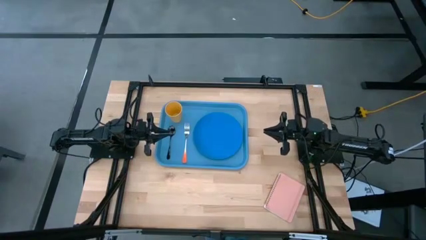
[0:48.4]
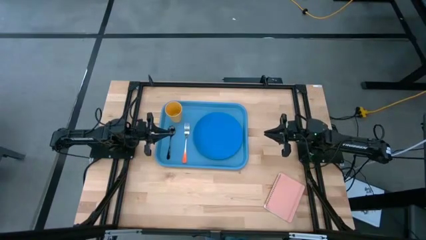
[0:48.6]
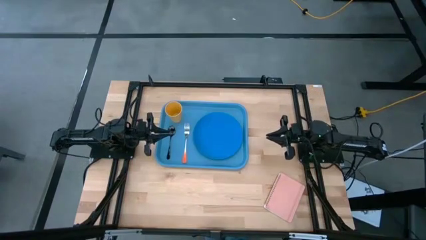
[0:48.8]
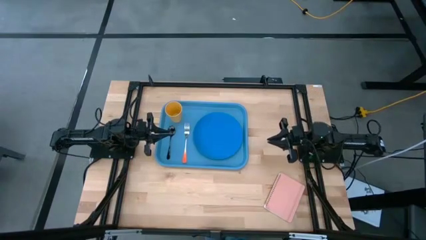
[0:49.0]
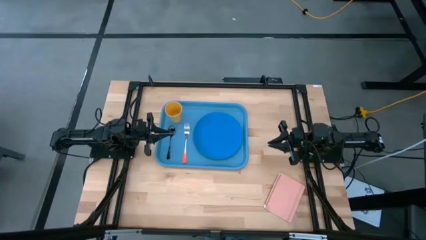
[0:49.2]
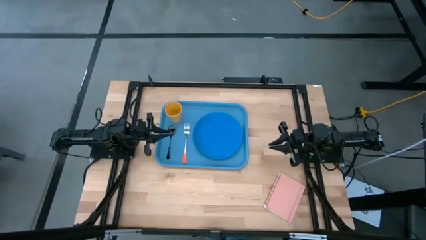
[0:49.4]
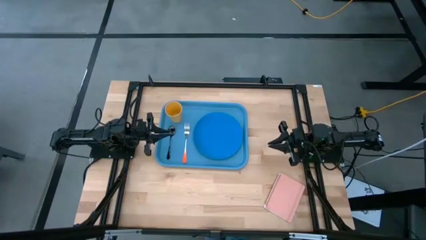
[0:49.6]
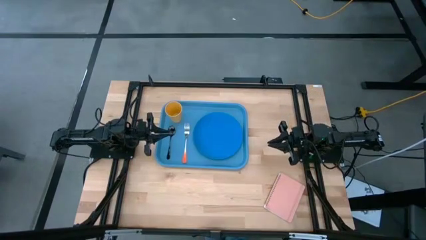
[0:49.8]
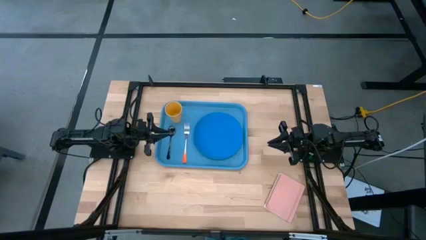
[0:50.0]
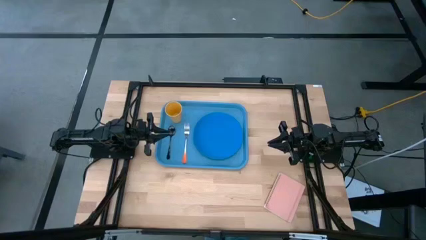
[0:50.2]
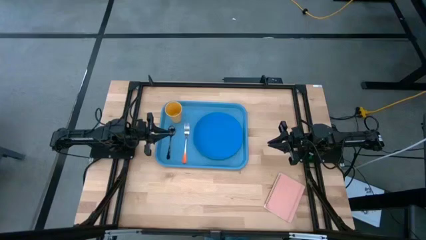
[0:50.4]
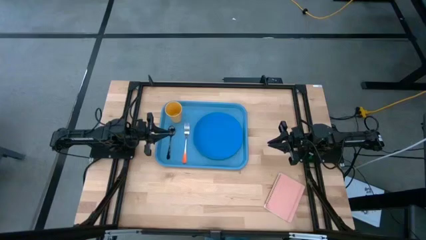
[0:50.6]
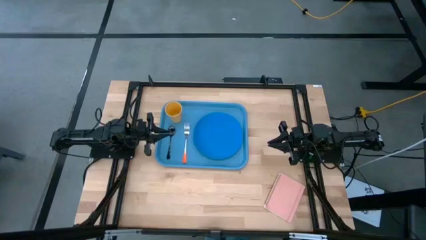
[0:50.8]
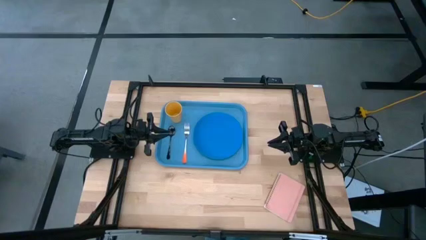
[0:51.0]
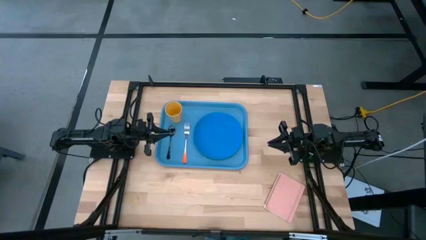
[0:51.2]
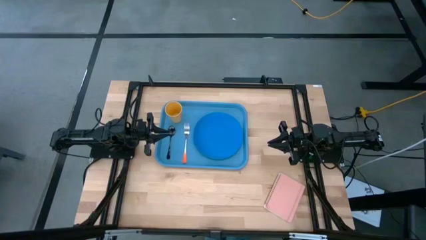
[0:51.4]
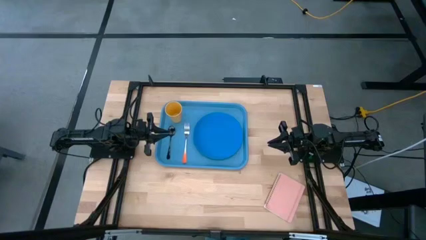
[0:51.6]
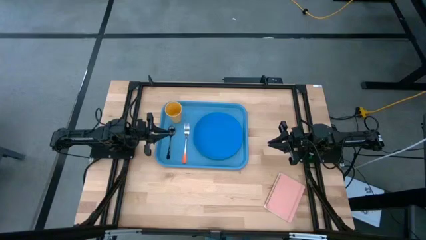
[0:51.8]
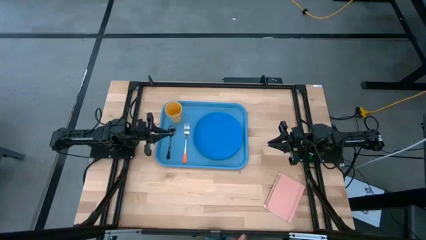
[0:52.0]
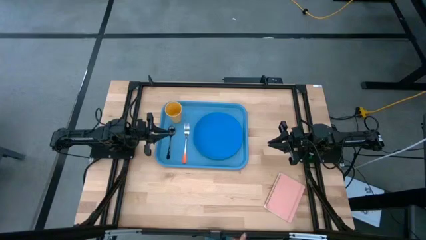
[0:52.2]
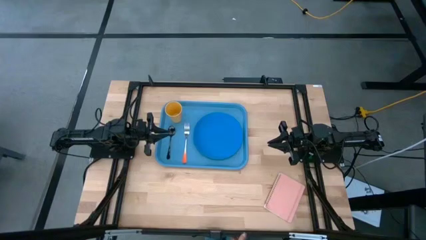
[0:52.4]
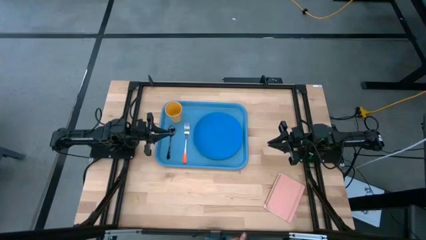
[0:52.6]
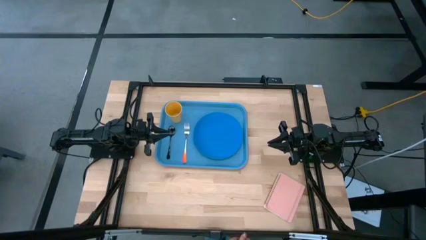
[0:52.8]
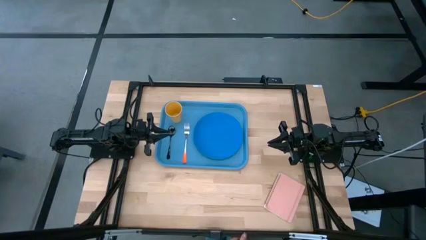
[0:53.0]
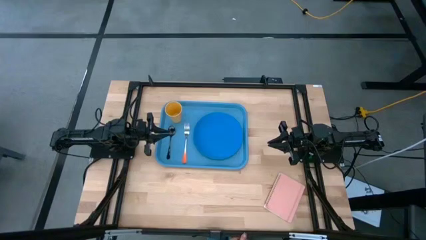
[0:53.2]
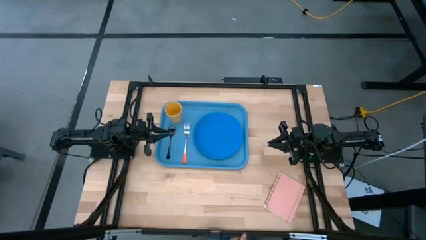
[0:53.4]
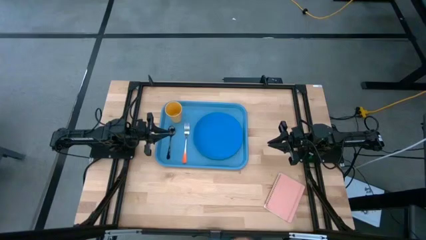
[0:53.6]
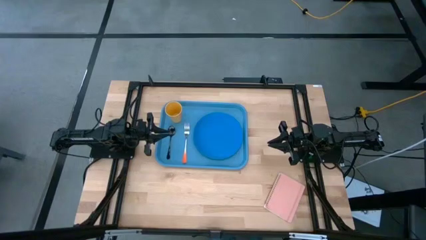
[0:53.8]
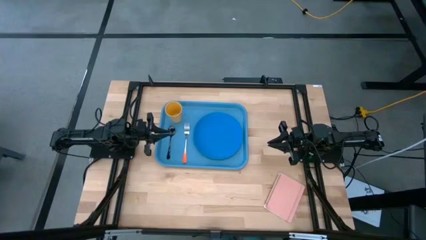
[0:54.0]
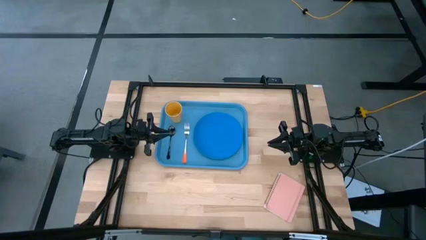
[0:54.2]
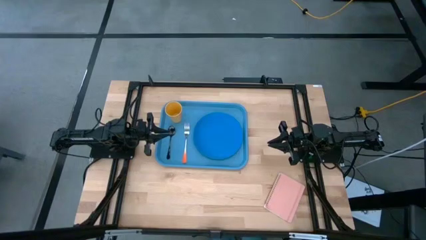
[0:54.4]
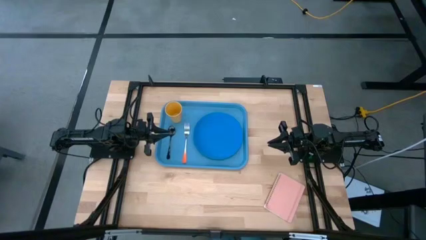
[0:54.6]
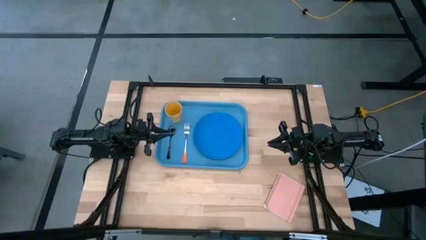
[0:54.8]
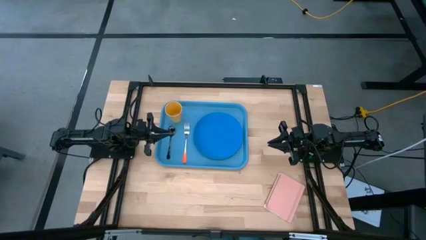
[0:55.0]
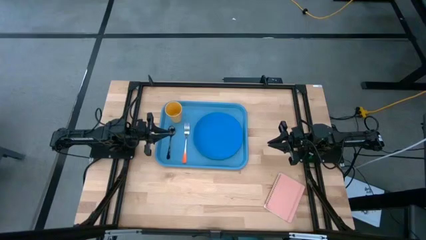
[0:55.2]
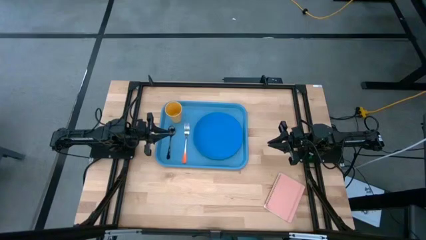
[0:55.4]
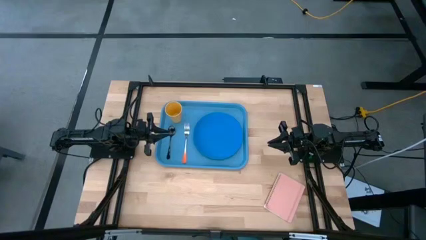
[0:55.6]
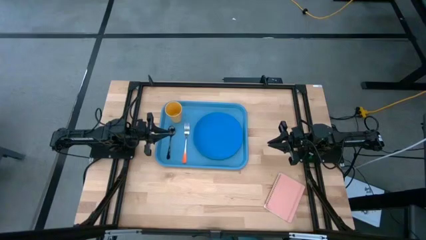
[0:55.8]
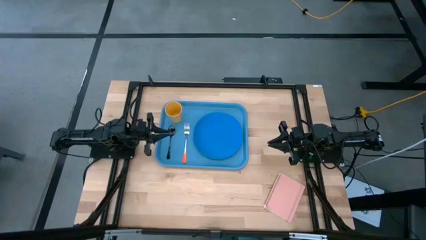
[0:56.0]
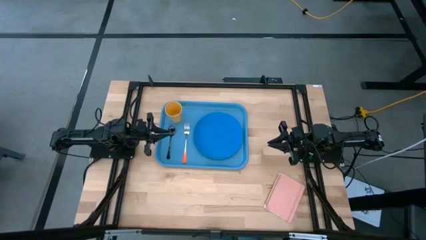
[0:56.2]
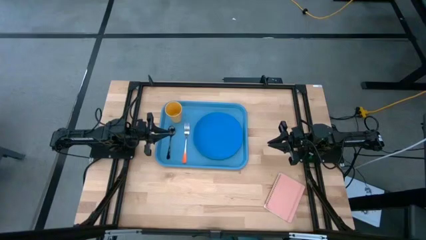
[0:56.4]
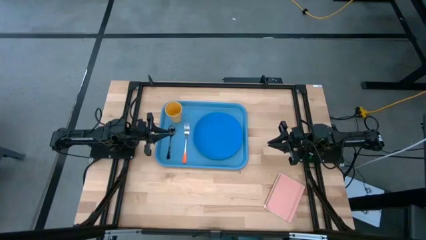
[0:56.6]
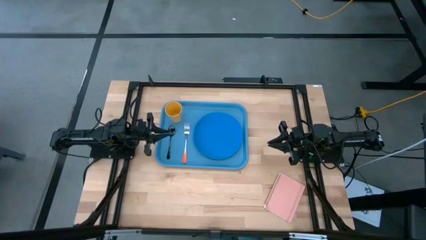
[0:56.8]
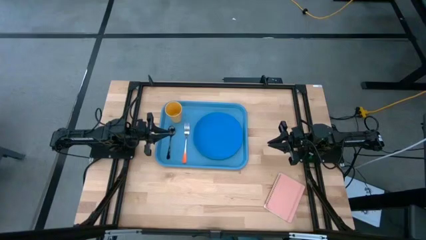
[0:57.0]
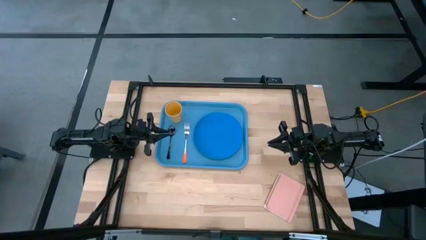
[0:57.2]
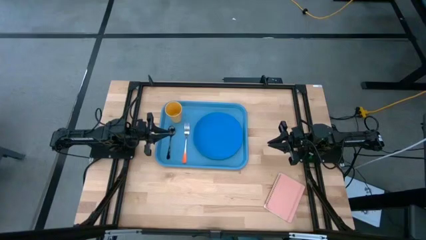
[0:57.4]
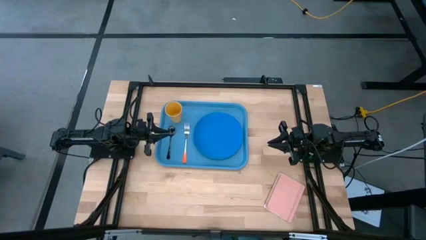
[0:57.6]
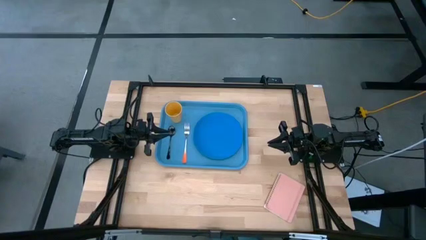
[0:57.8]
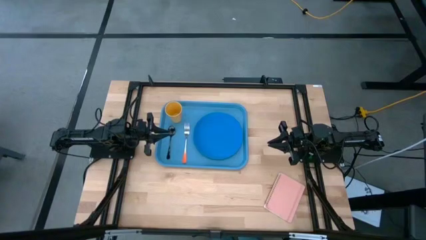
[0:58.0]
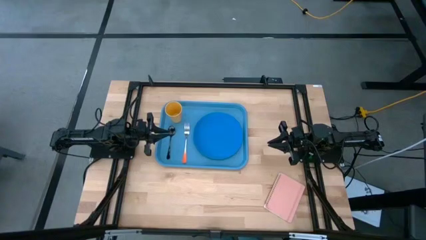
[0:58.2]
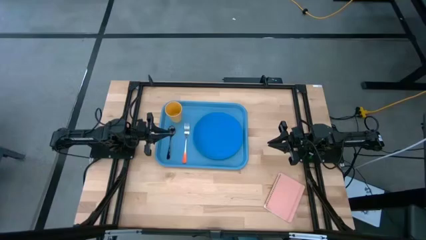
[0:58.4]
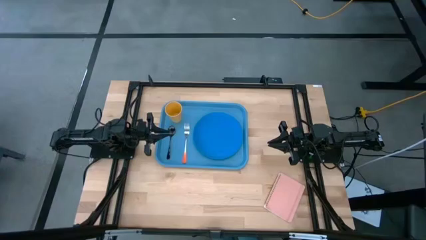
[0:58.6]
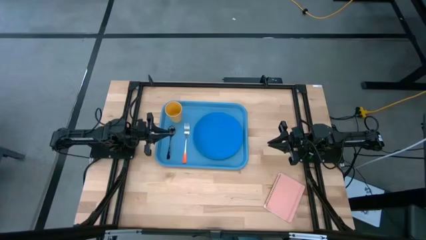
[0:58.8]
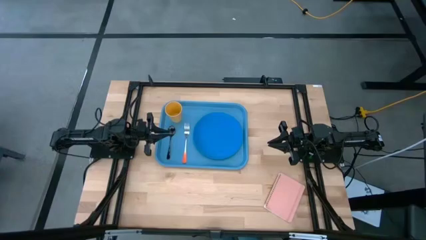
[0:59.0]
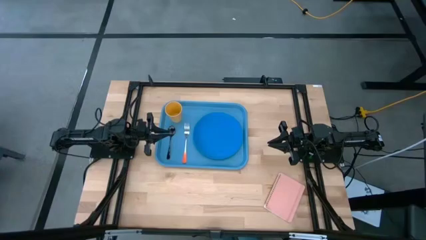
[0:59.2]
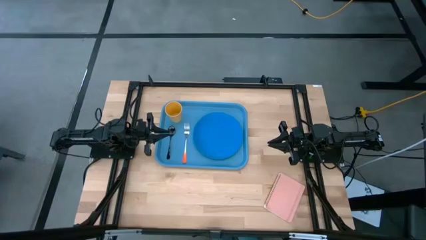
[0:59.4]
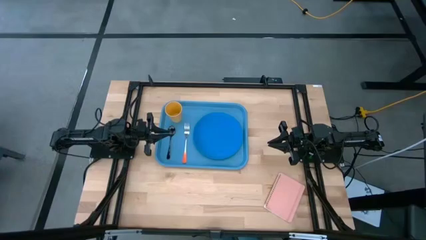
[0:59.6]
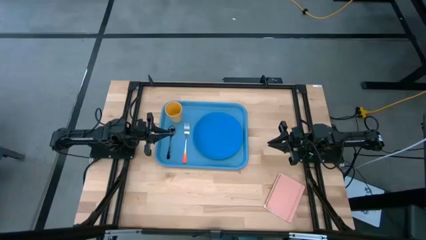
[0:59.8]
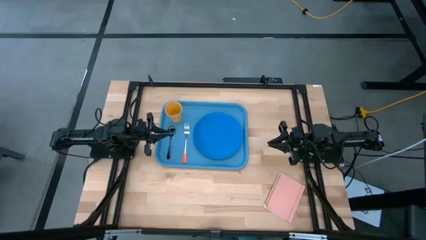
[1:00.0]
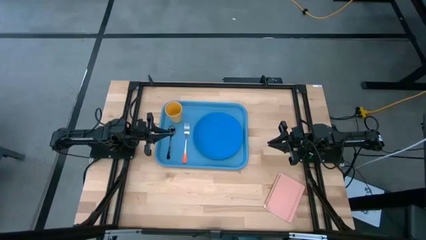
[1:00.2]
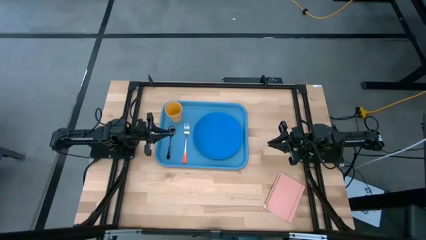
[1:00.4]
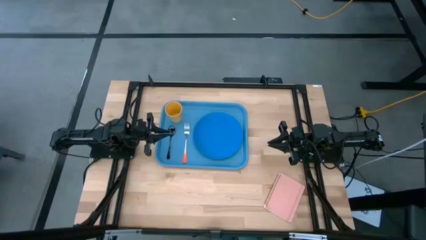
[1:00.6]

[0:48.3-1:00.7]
Task: Pick and place plate/cup/fork/spoon on tray
Return to Home Position
